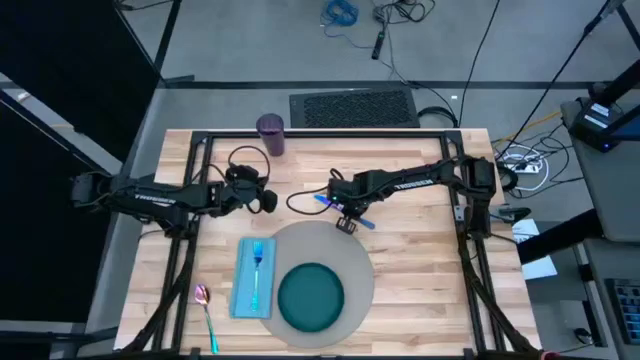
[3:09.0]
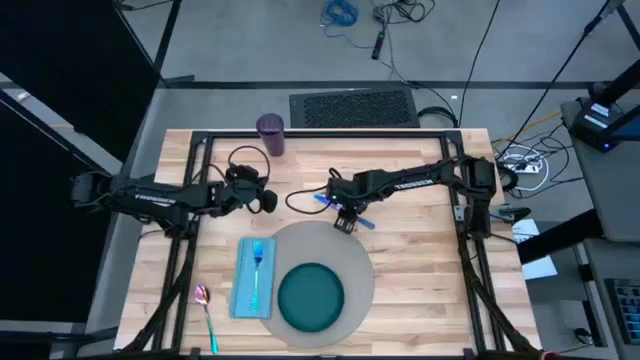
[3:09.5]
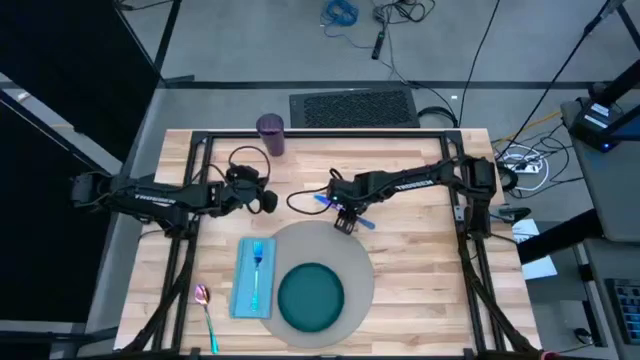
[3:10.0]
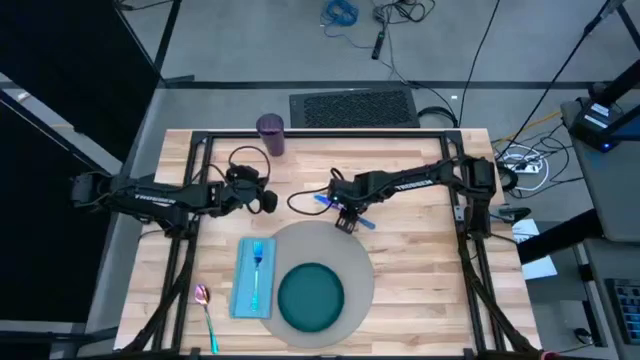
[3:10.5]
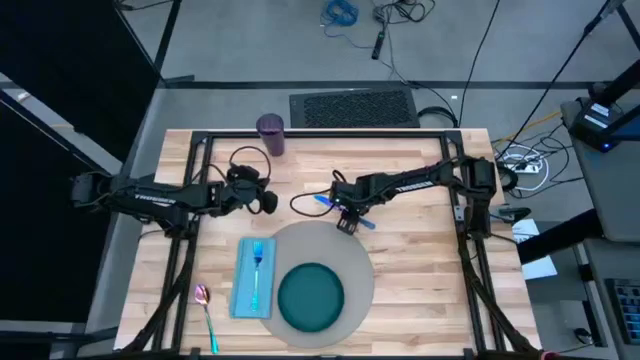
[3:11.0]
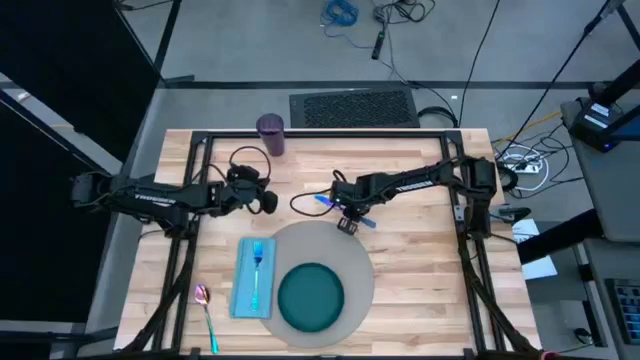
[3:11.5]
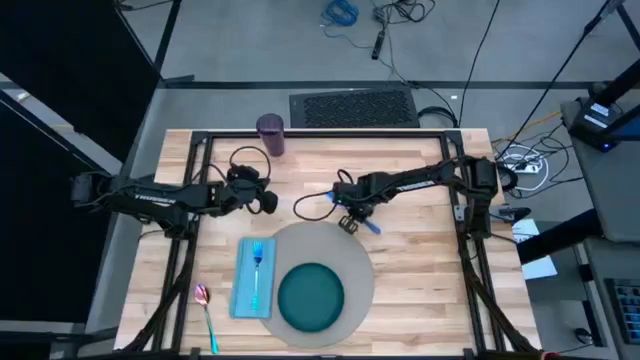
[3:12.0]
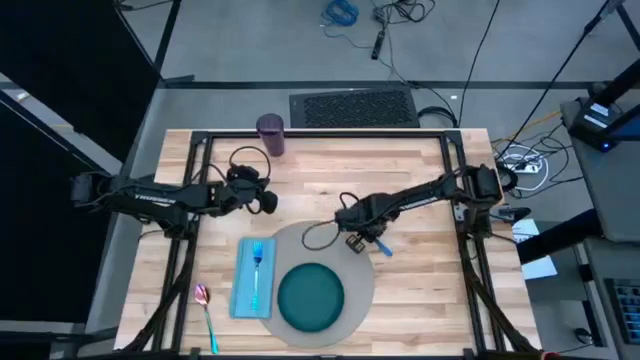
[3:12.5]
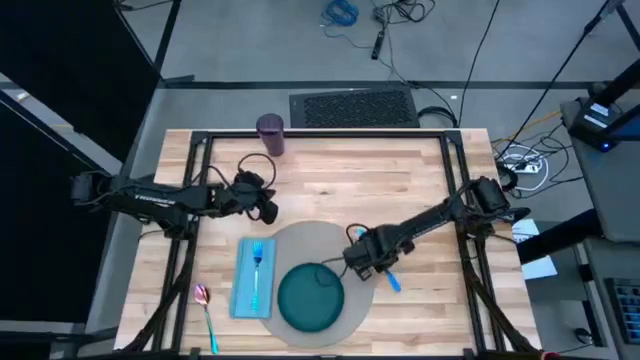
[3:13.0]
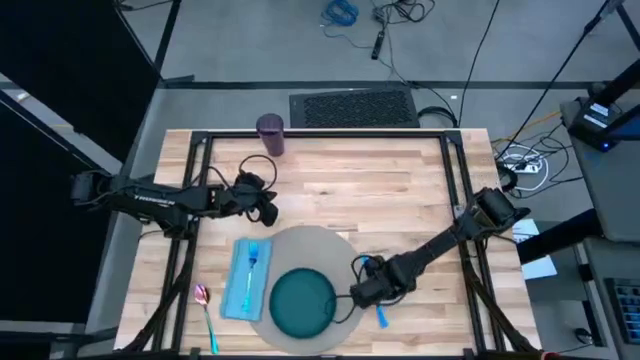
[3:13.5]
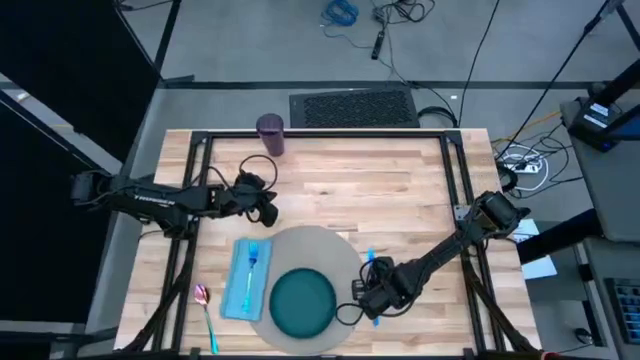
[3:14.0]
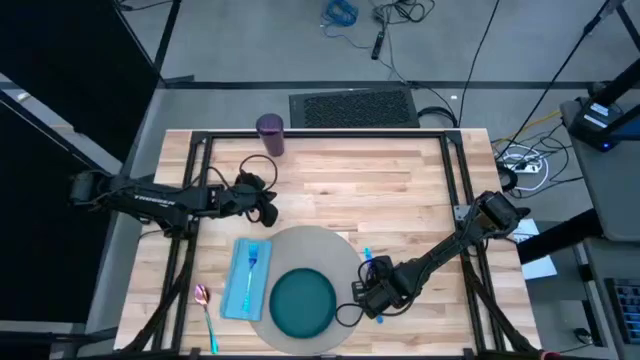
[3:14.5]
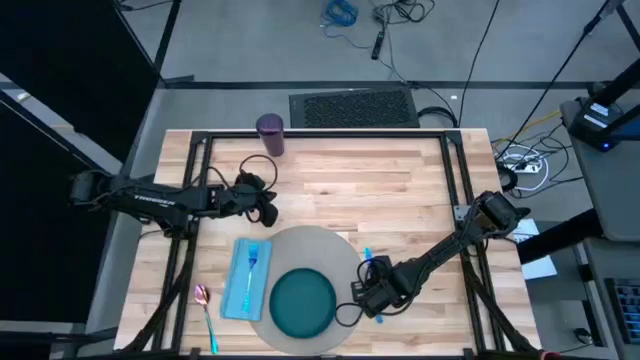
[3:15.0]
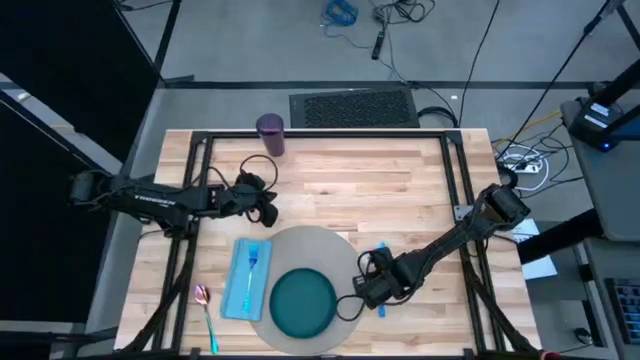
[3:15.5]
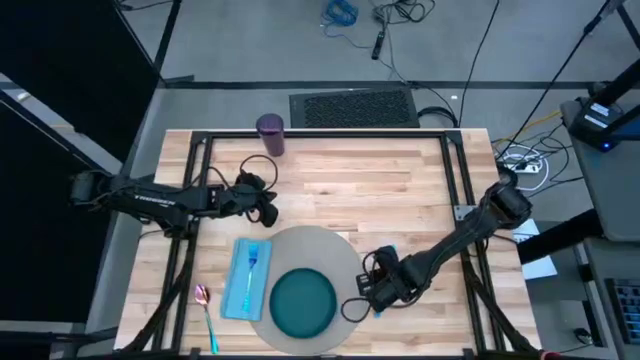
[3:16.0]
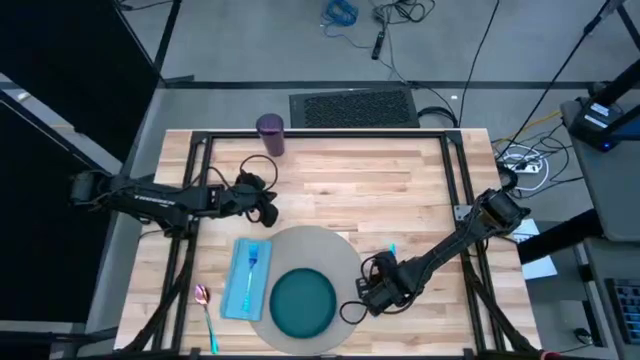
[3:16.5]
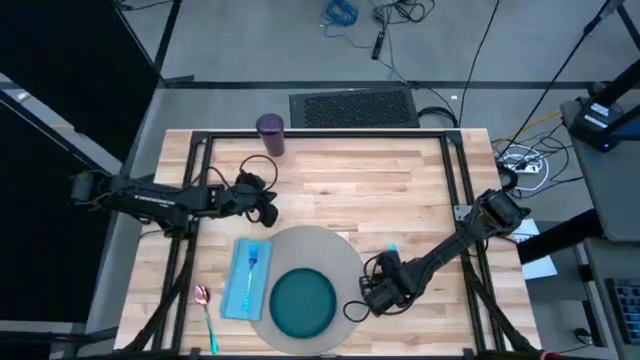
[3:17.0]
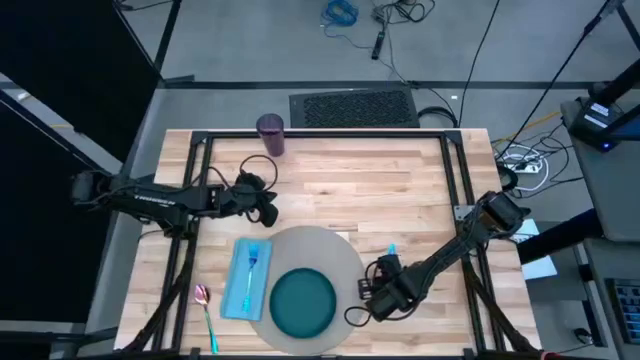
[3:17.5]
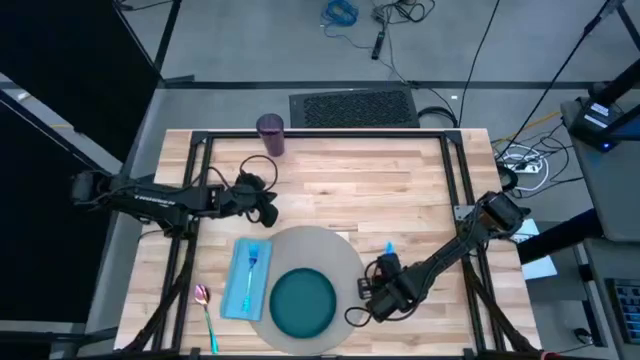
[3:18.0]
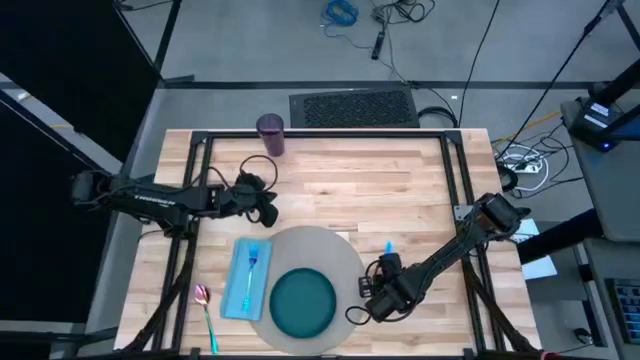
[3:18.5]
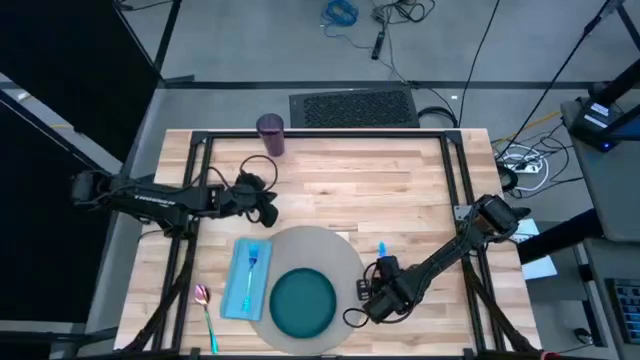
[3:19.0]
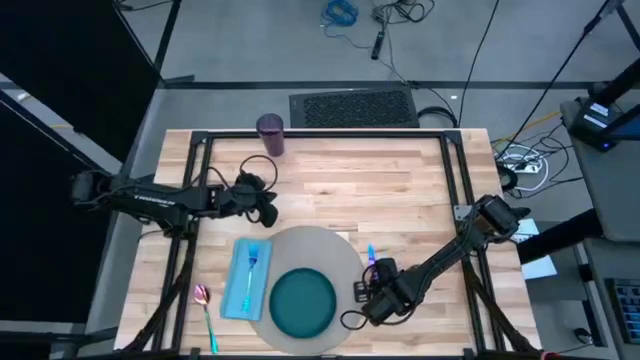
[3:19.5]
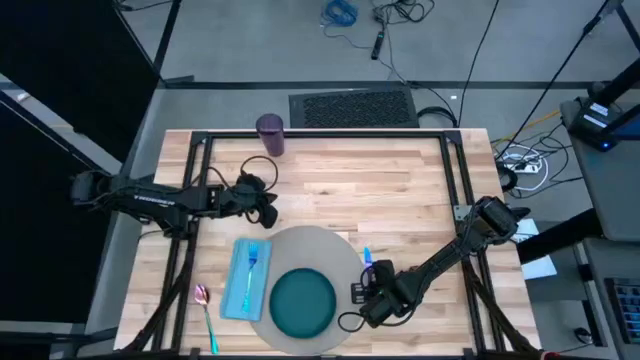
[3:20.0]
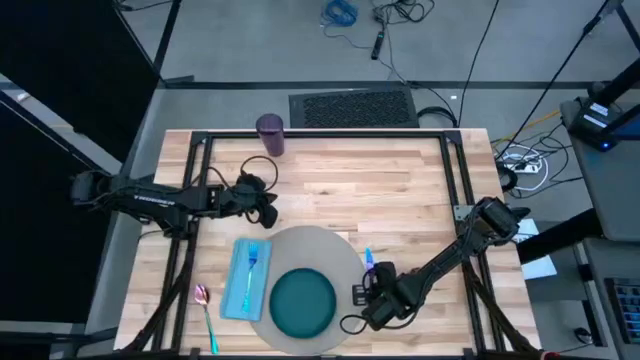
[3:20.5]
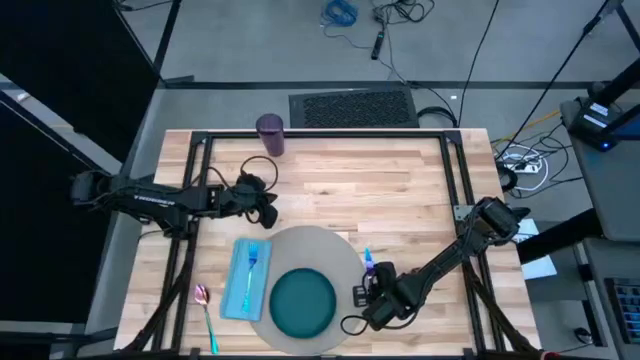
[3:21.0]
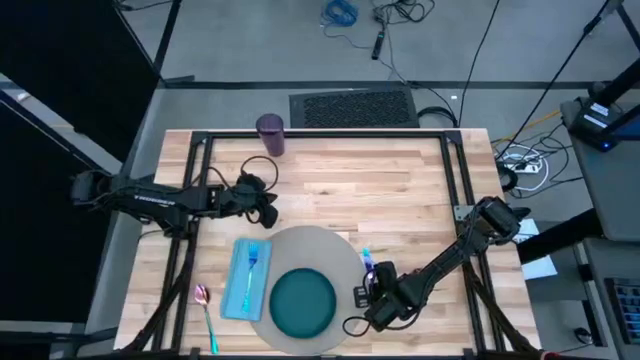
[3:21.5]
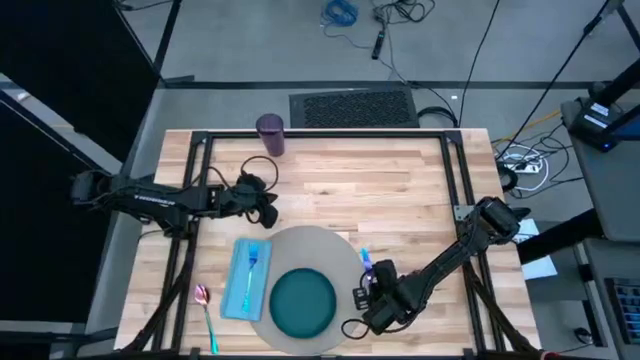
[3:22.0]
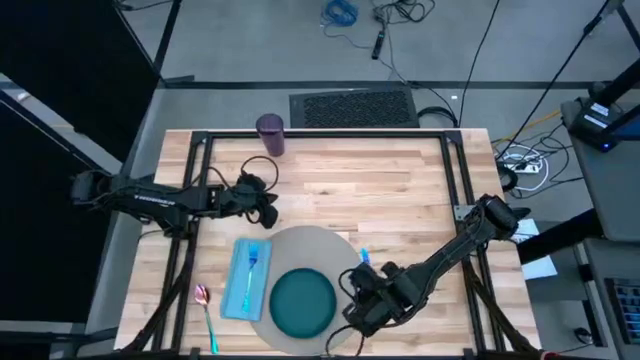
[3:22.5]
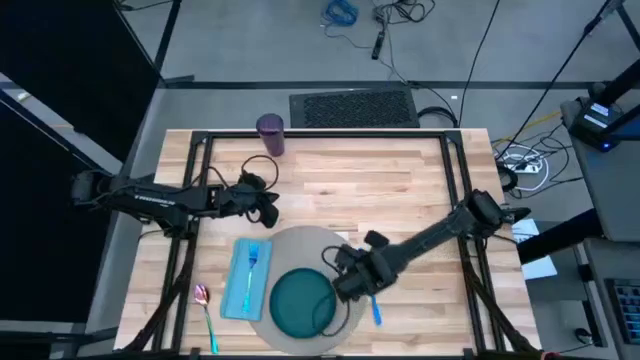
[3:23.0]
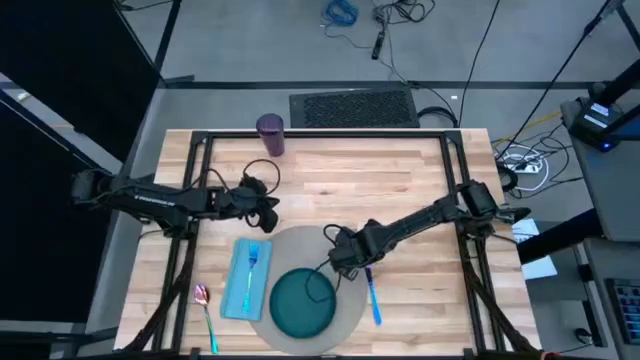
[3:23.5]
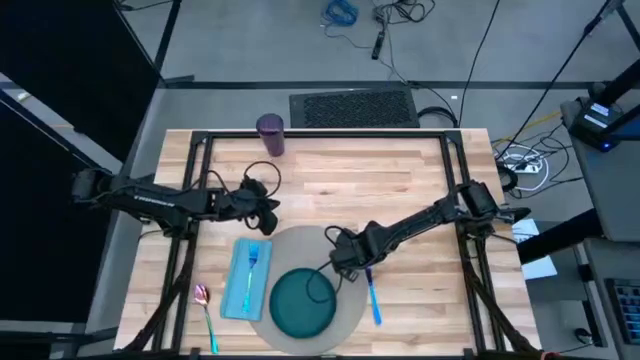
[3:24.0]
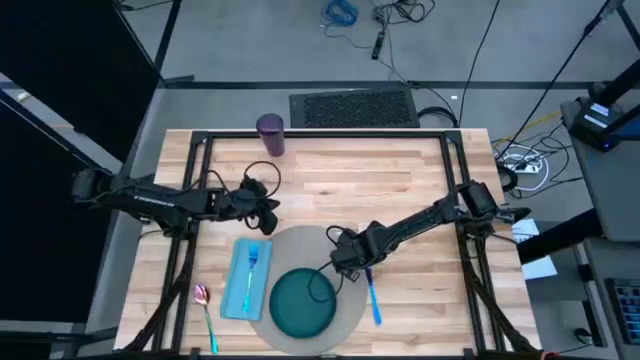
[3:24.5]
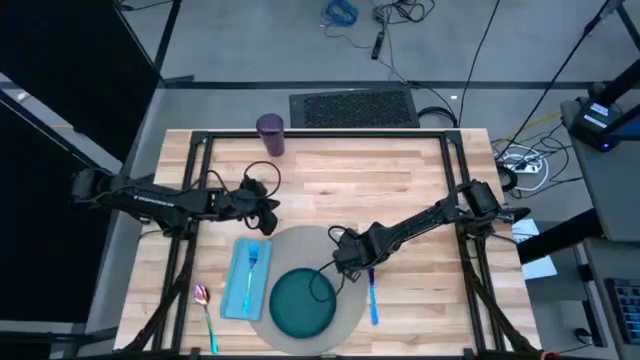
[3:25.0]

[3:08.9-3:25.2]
Task: Set table place
Move the blue table knife to the right of gray placemat

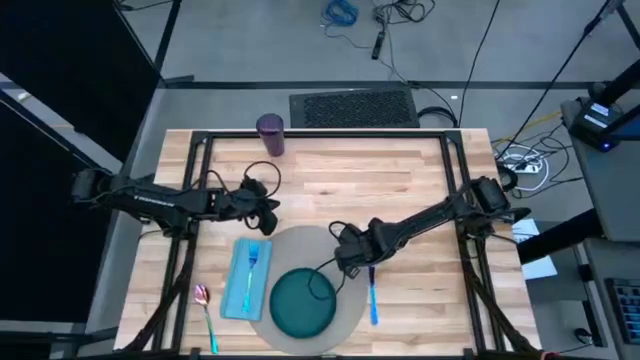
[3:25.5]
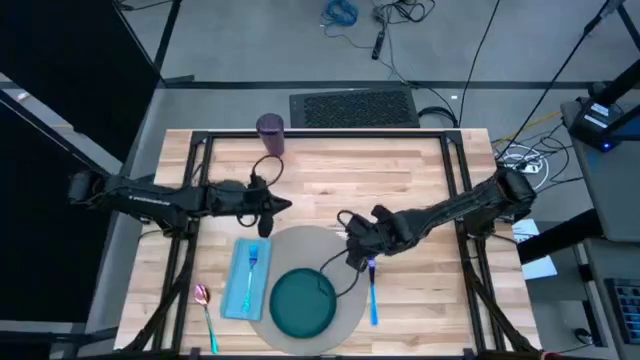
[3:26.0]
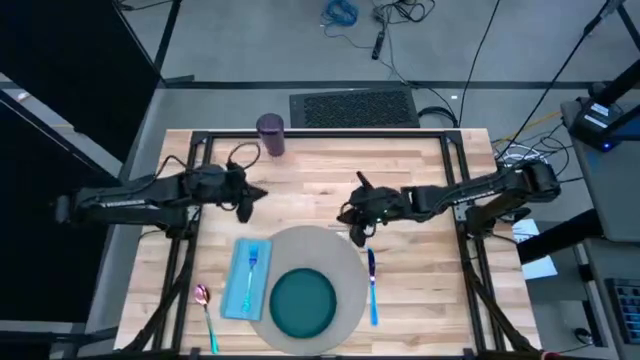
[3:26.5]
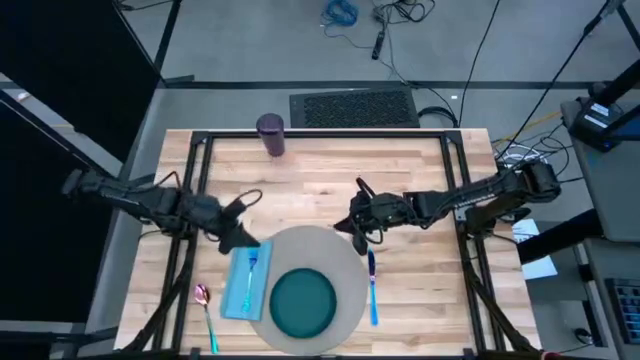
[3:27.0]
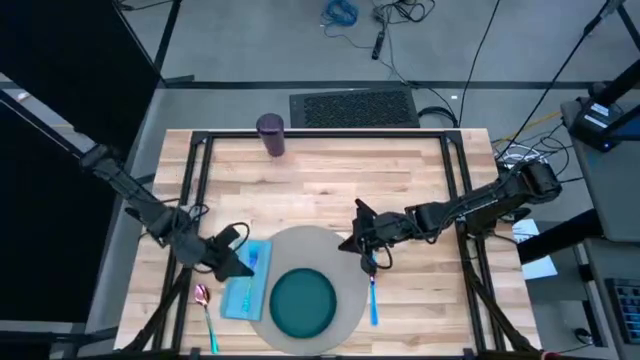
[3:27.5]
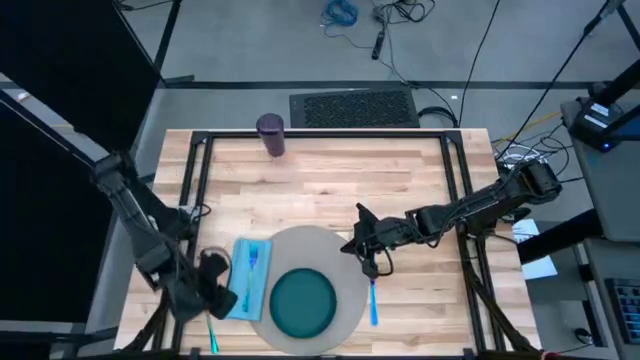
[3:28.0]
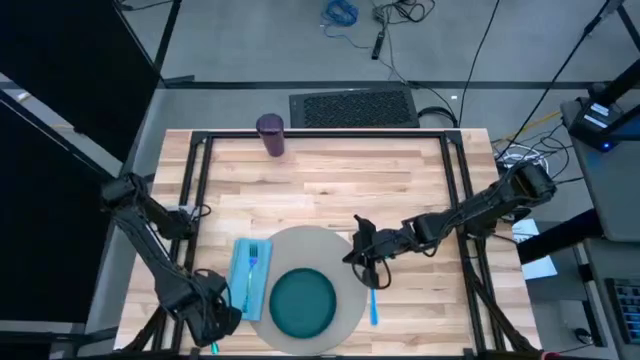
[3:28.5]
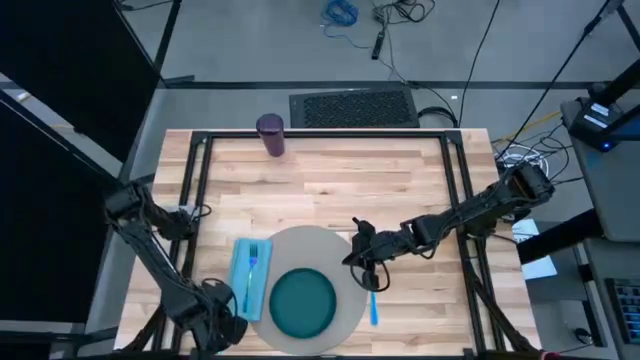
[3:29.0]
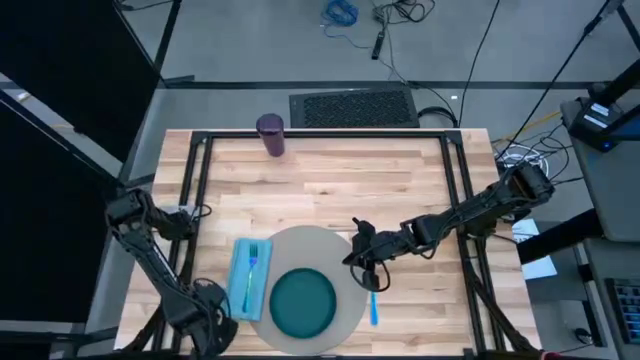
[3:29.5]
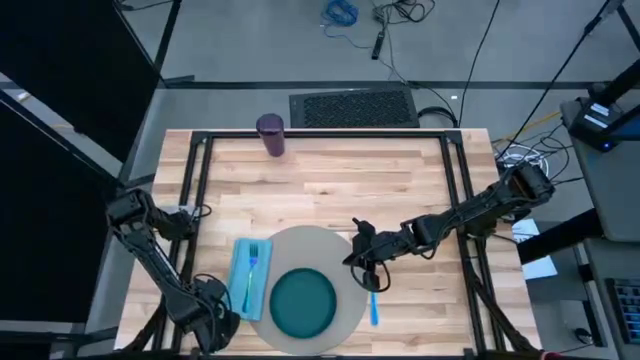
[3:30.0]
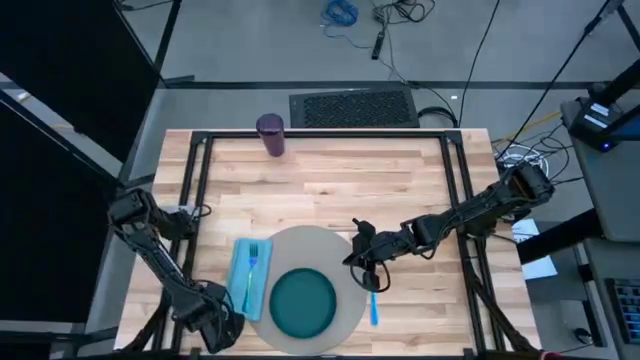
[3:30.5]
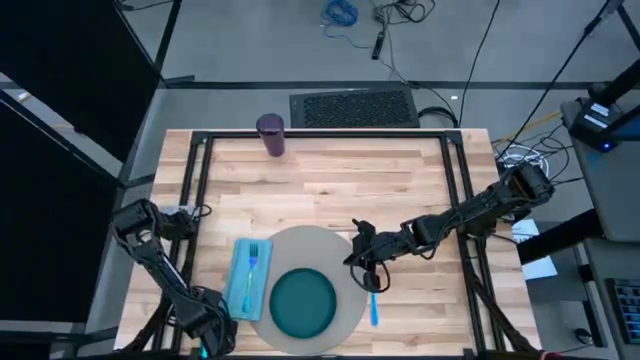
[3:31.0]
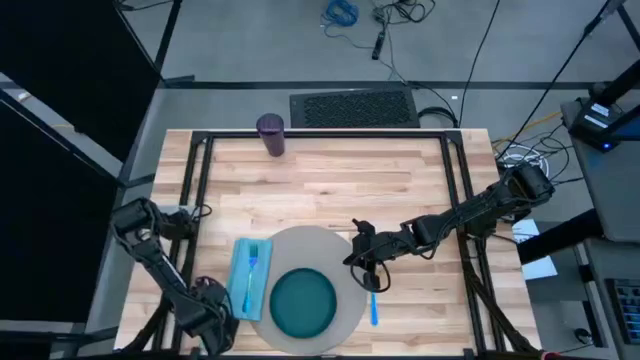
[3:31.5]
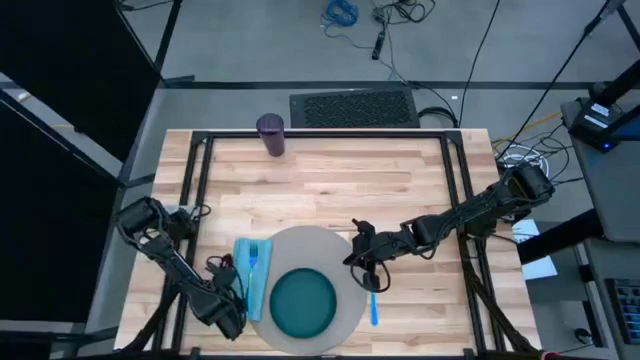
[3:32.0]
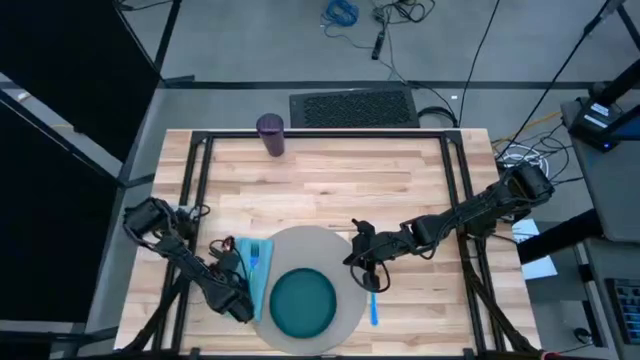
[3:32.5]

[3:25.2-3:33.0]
Put the blue spoon to the right of the blue table knife
